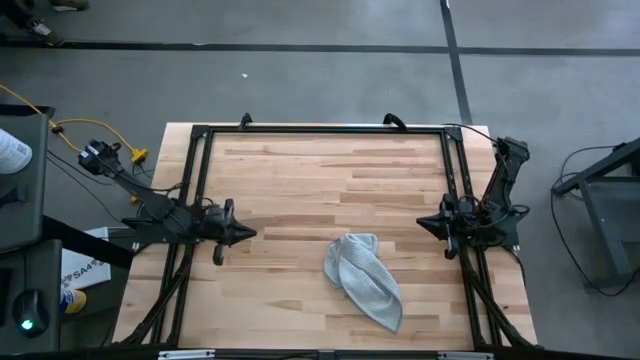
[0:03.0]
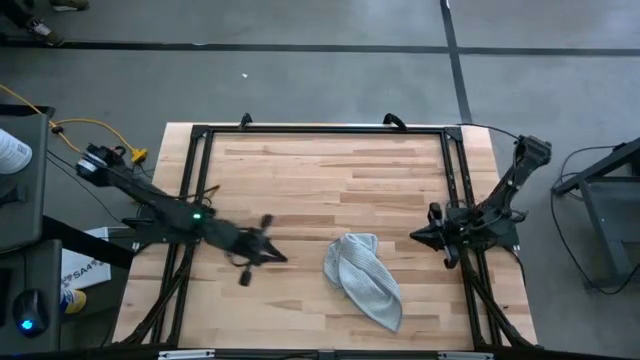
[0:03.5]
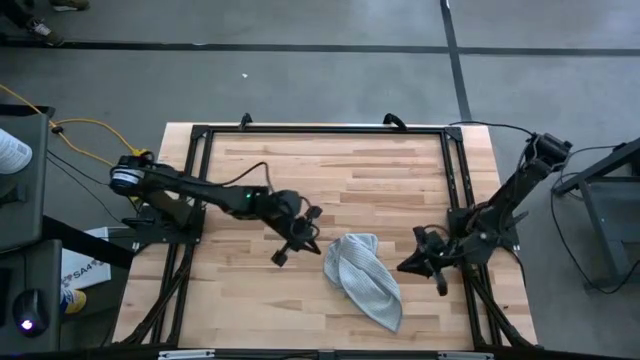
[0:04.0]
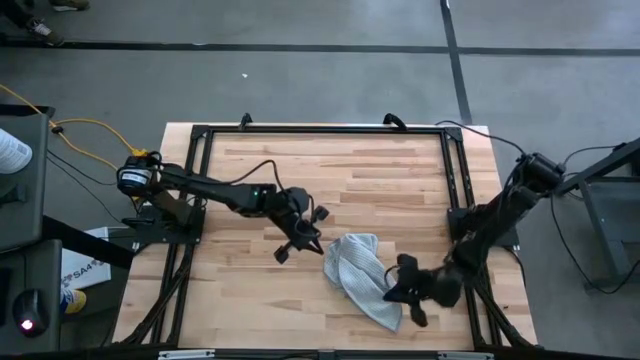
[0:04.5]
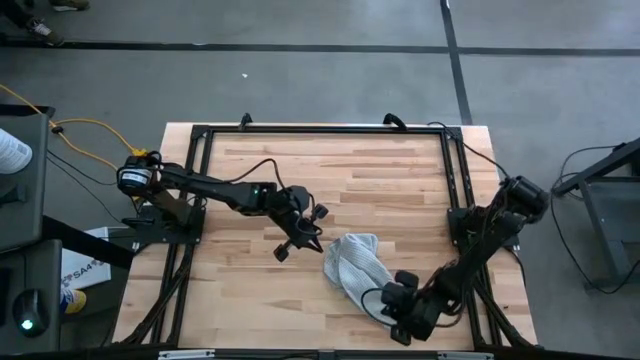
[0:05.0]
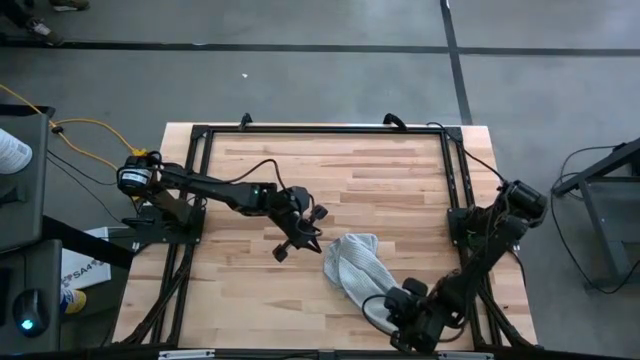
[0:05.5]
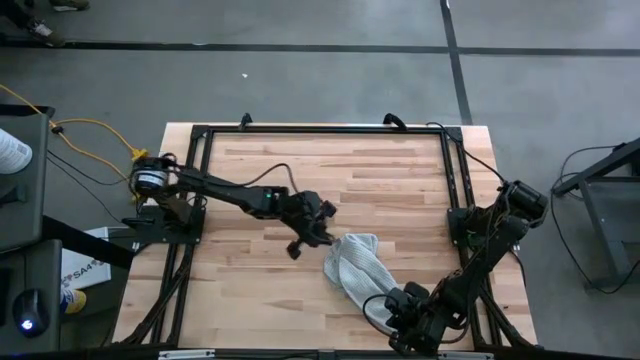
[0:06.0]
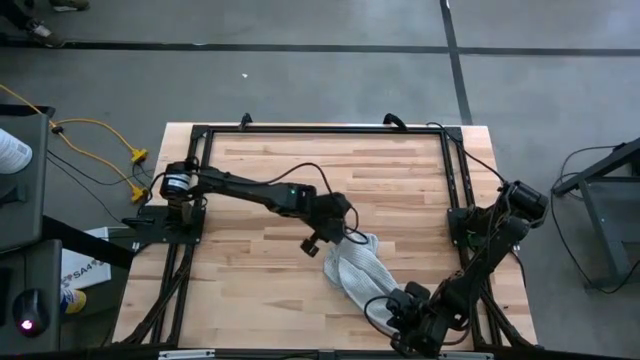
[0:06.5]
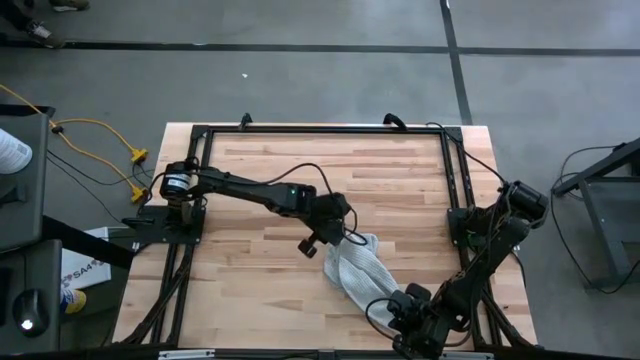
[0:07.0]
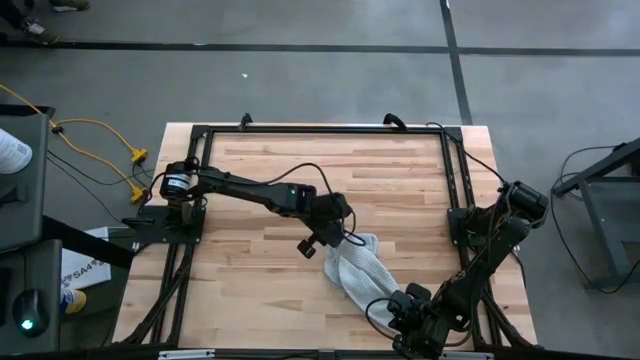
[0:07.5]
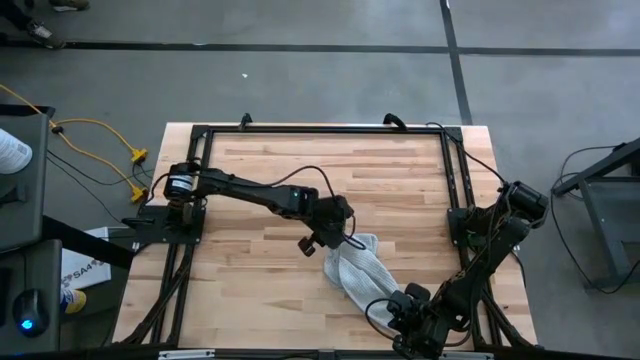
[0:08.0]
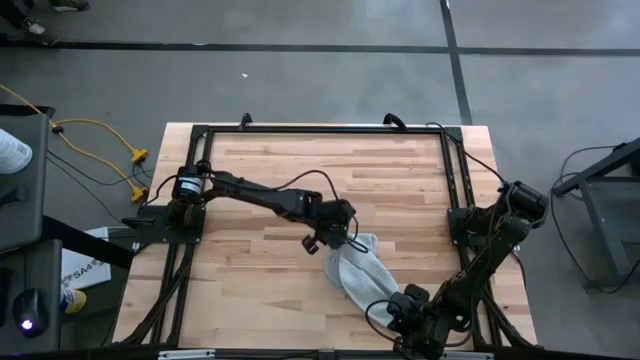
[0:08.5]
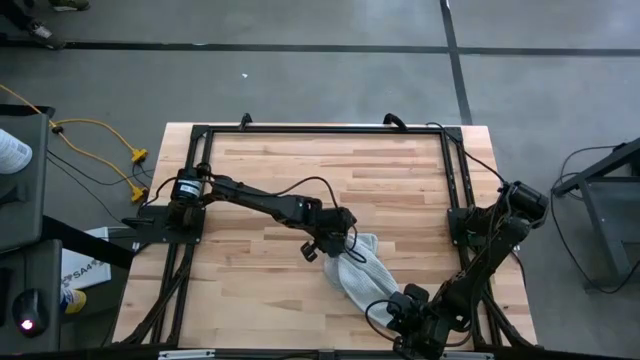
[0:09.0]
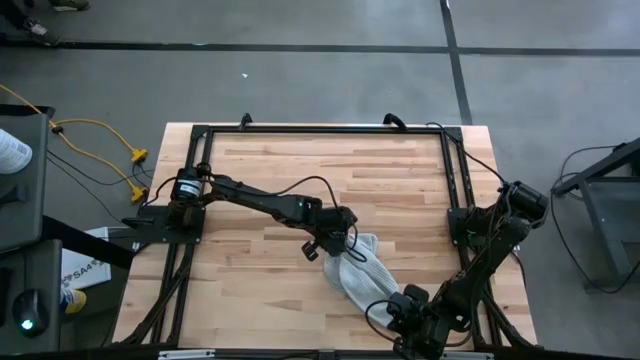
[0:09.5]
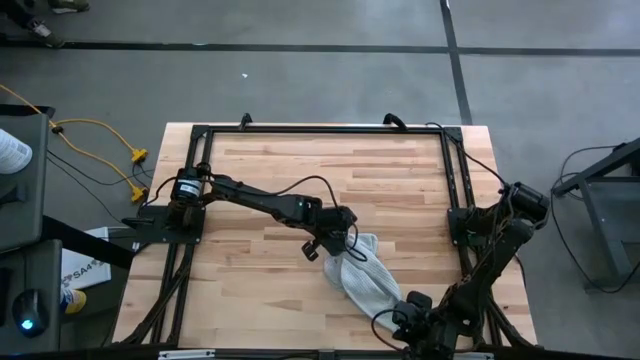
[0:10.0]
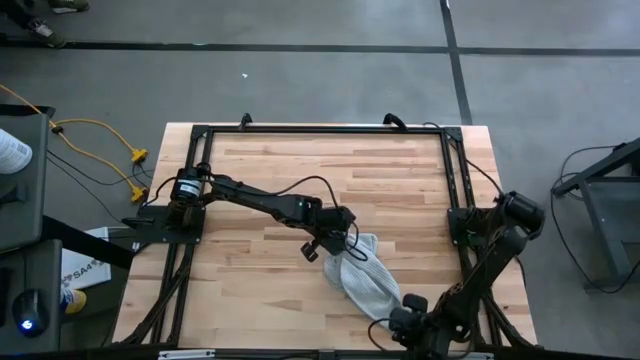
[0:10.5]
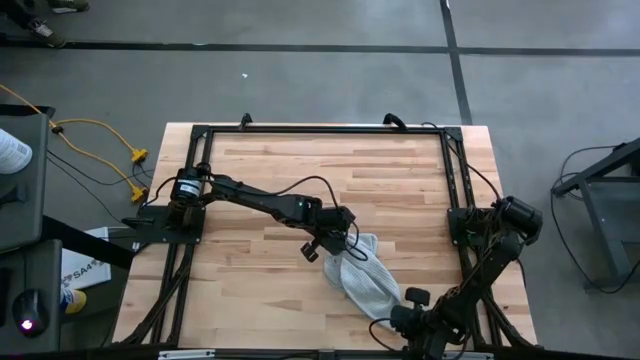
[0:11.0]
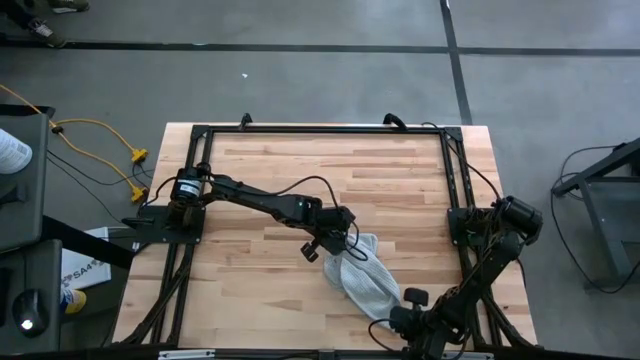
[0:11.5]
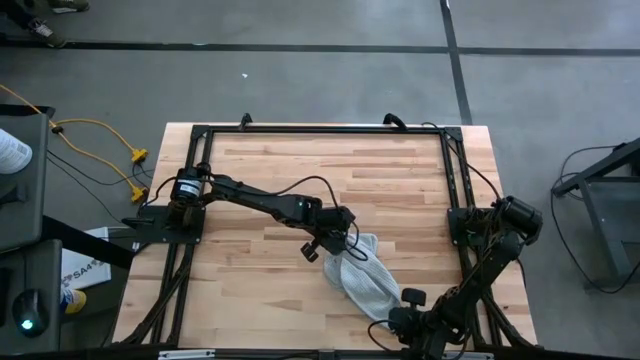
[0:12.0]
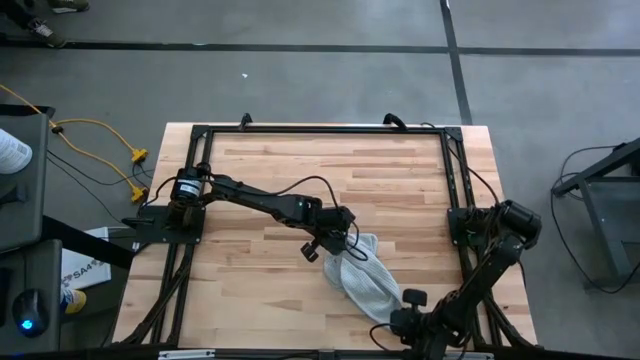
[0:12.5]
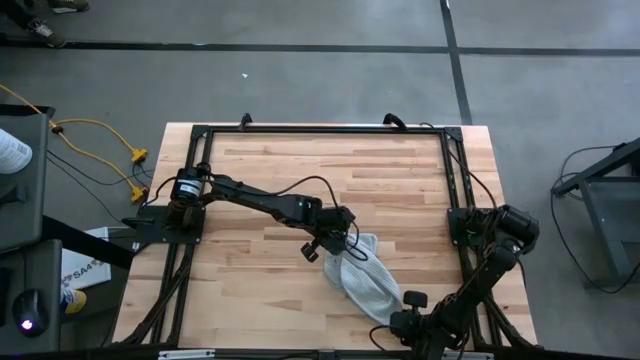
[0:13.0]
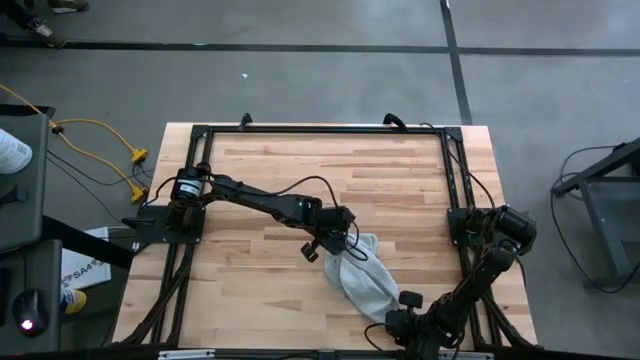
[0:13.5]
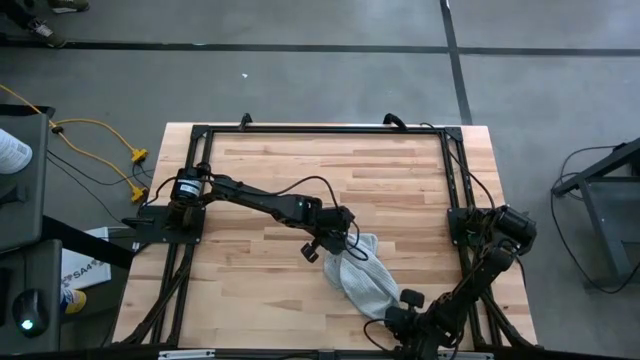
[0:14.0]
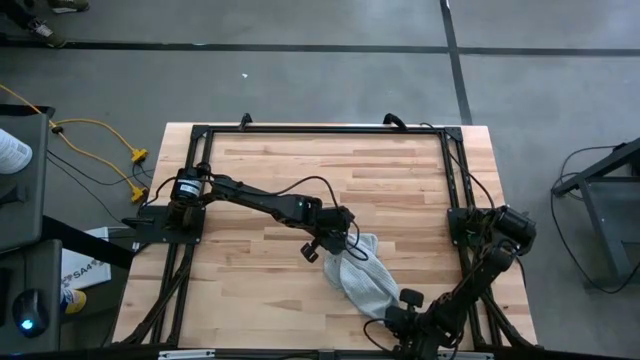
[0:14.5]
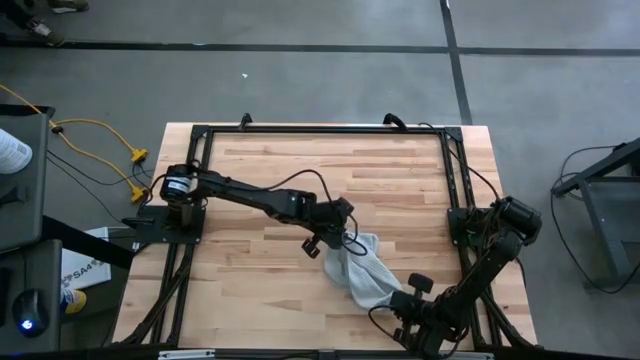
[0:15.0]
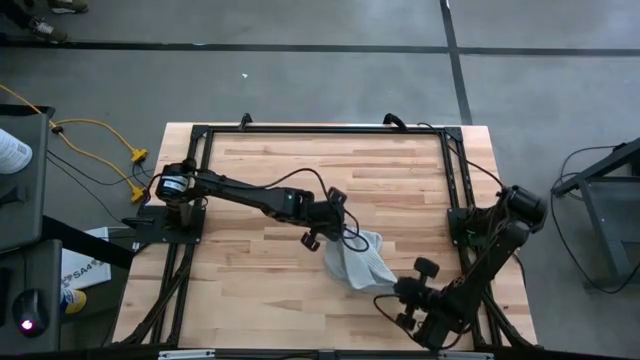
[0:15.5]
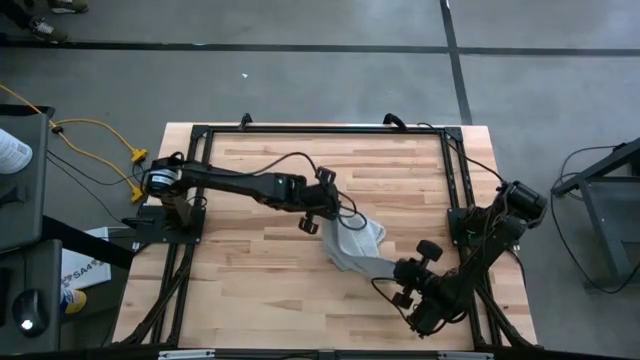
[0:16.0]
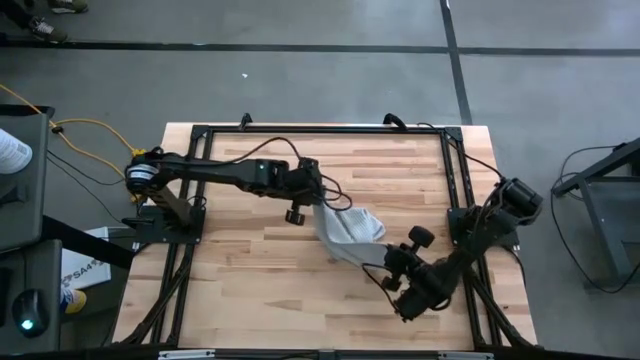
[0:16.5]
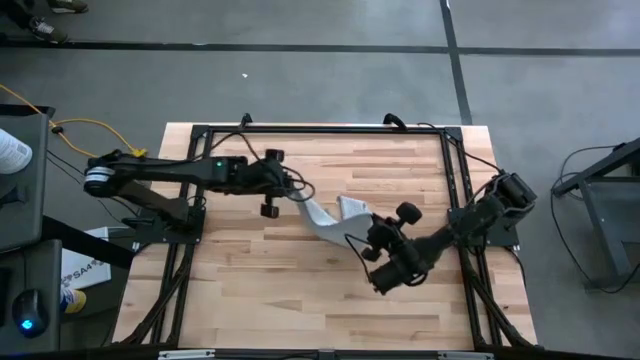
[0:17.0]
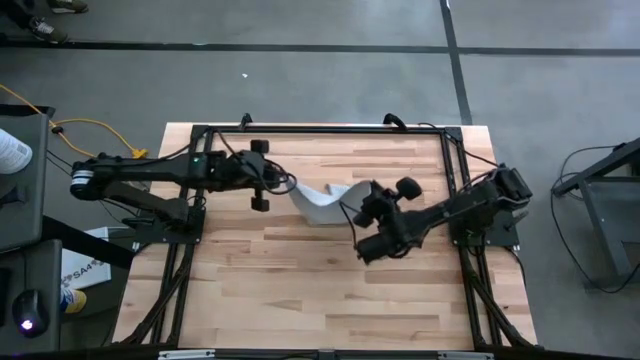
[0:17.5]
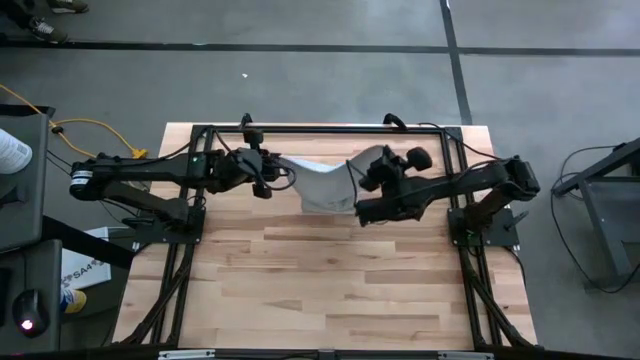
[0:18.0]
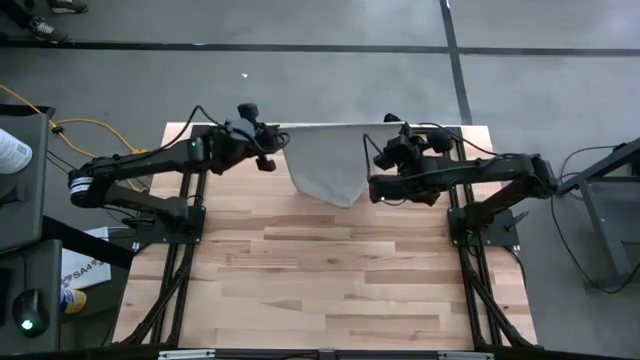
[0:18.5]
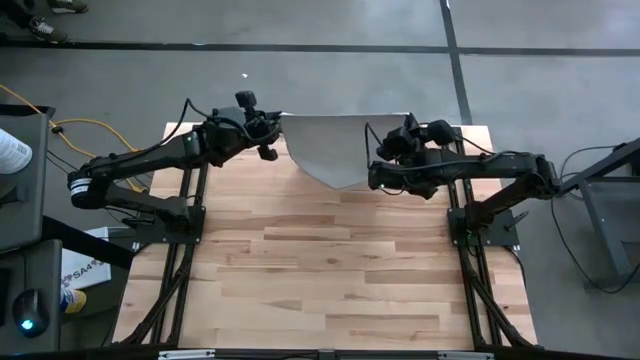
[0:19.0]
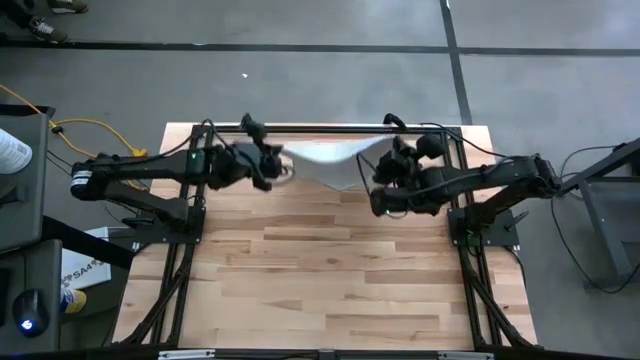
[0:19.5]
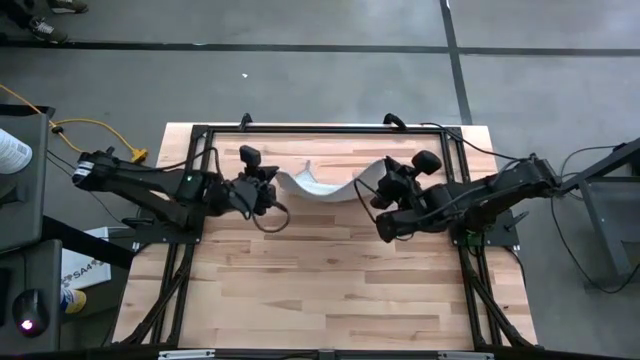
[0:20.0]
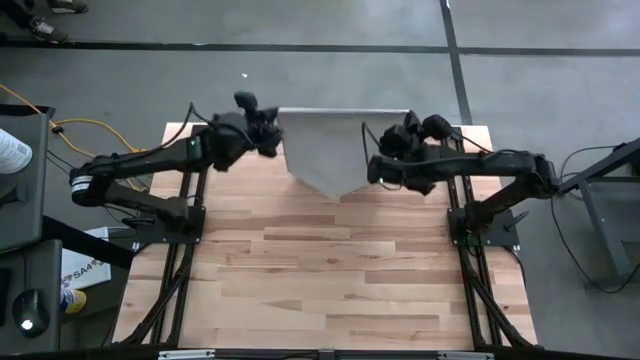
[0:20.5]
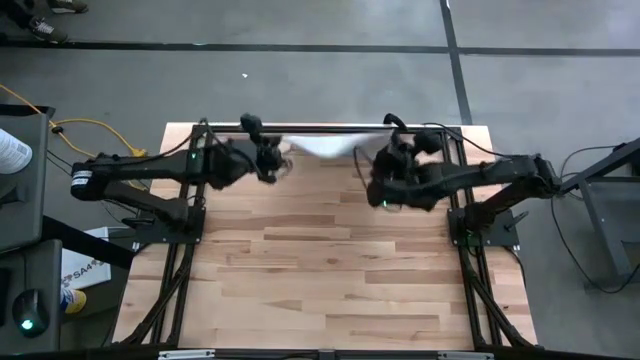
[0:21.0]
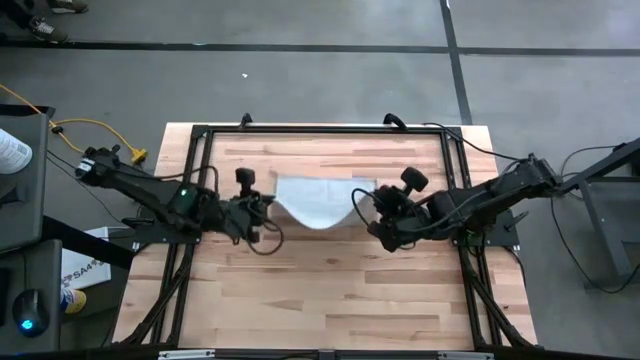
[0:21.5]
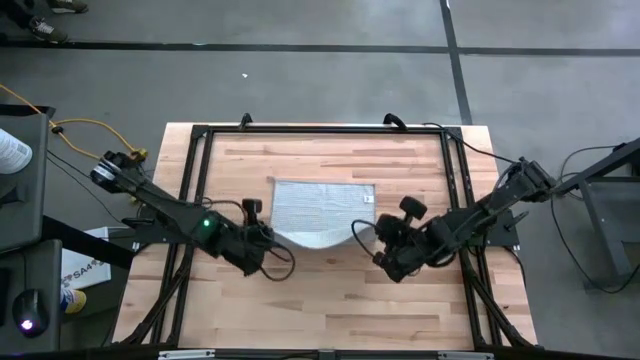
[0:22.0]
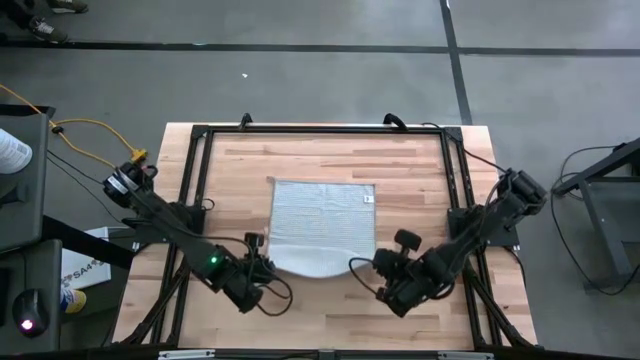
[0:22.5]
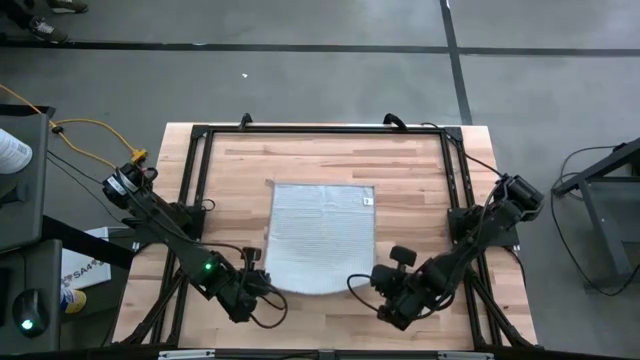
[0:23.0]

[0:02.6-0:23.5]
Task: Fold microfiber towels
Fold the gray towel
